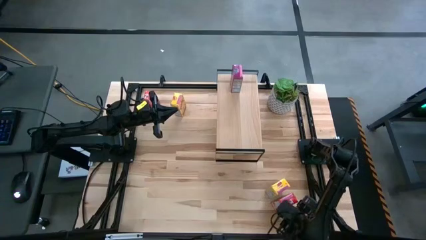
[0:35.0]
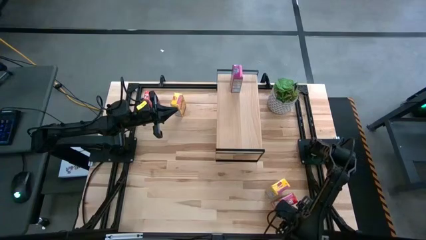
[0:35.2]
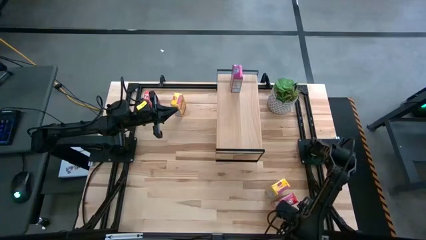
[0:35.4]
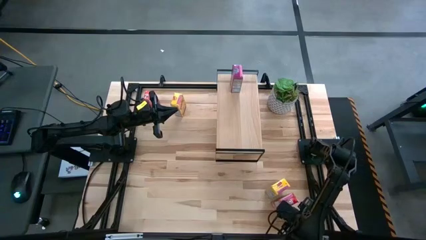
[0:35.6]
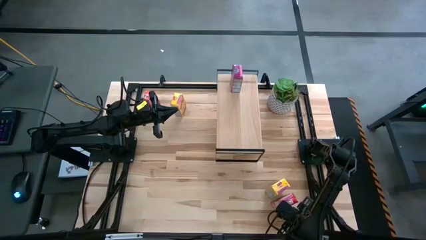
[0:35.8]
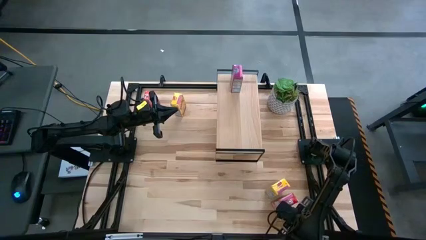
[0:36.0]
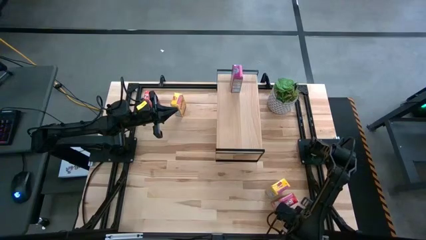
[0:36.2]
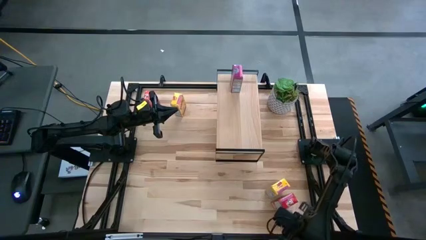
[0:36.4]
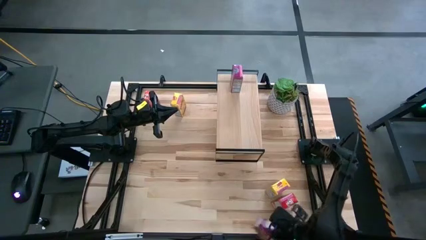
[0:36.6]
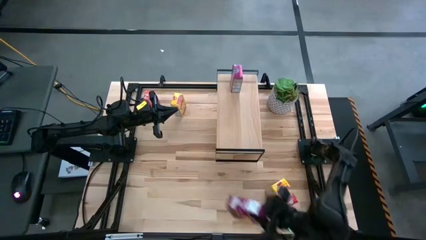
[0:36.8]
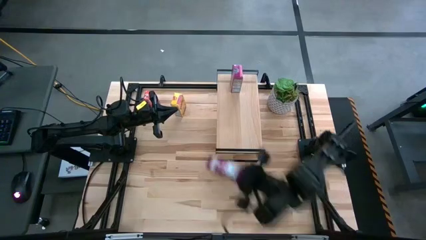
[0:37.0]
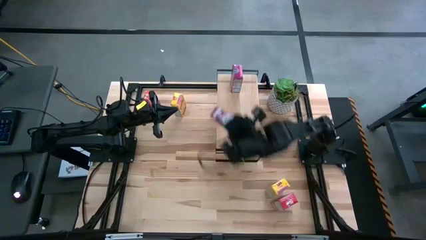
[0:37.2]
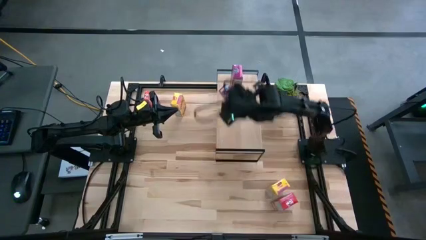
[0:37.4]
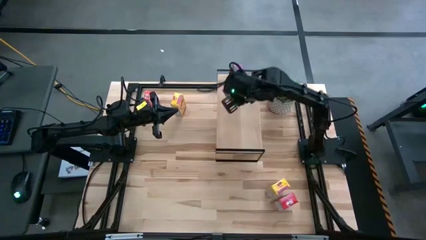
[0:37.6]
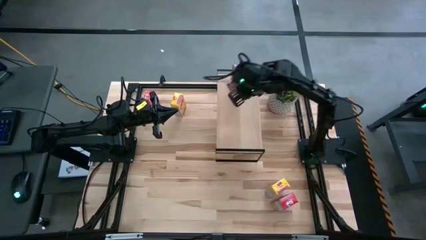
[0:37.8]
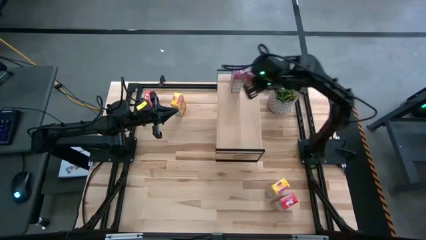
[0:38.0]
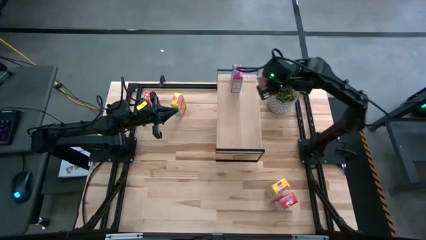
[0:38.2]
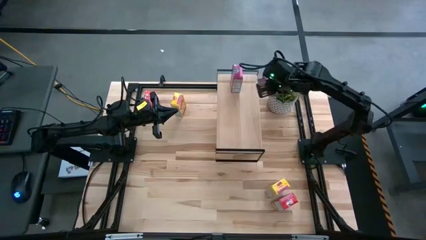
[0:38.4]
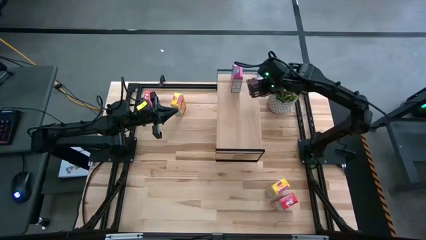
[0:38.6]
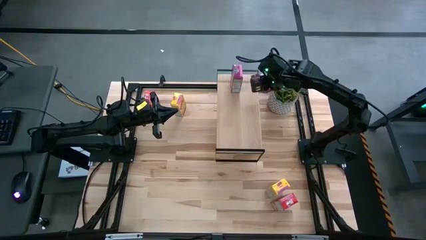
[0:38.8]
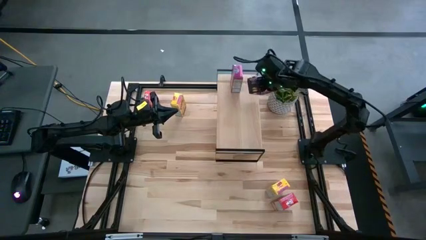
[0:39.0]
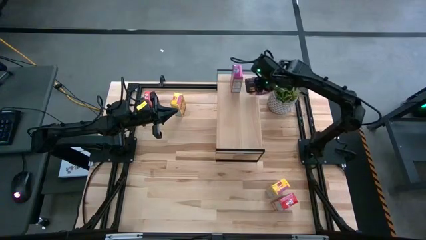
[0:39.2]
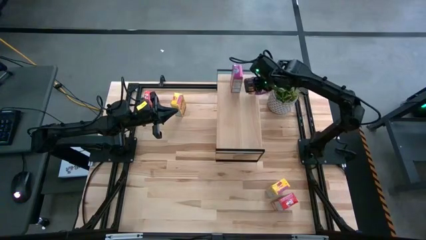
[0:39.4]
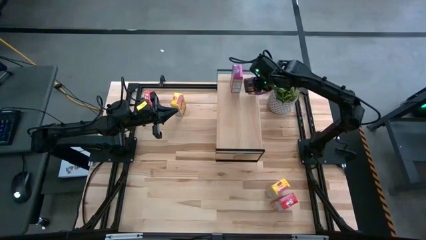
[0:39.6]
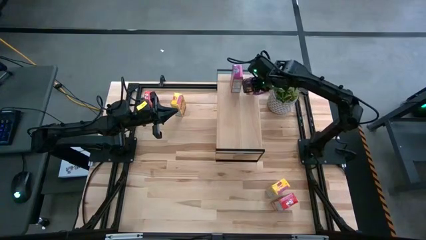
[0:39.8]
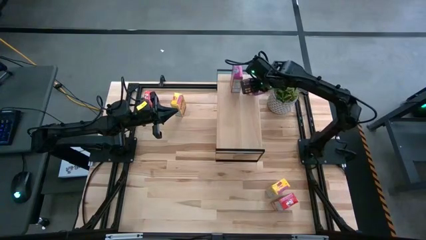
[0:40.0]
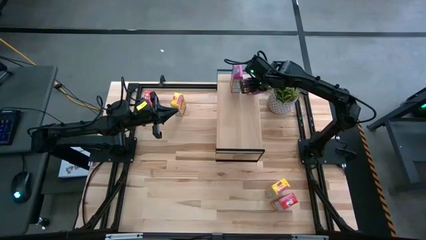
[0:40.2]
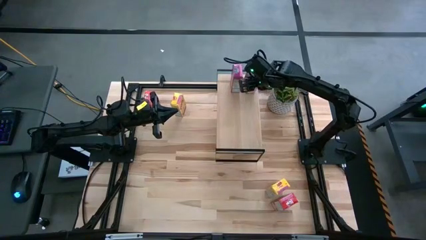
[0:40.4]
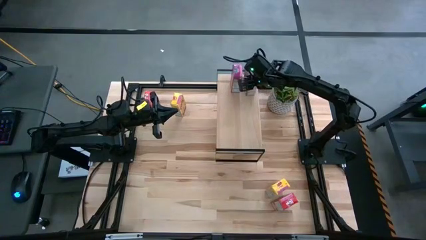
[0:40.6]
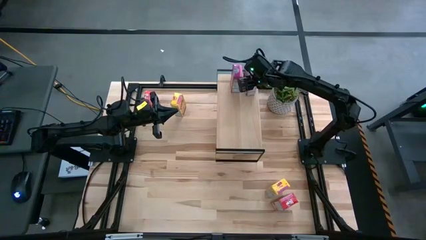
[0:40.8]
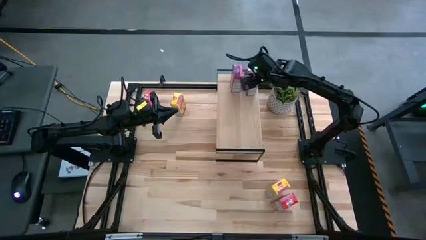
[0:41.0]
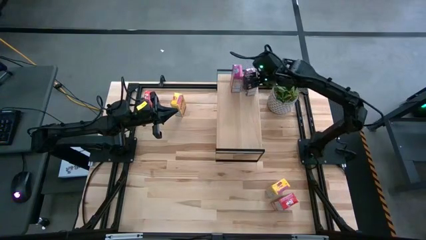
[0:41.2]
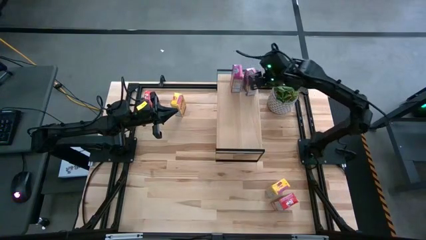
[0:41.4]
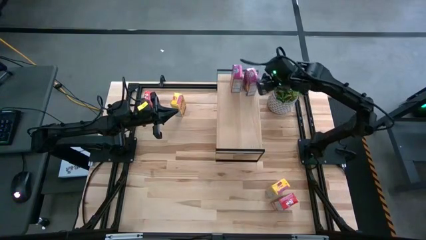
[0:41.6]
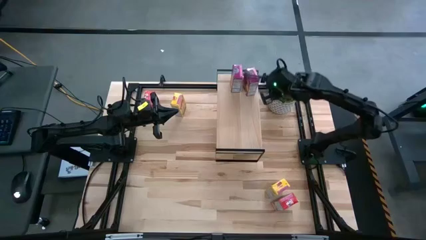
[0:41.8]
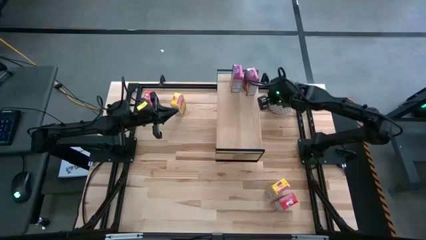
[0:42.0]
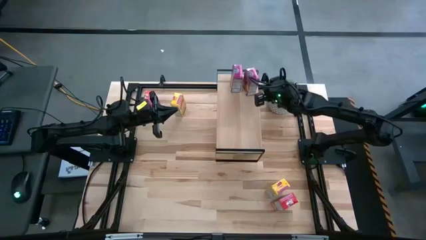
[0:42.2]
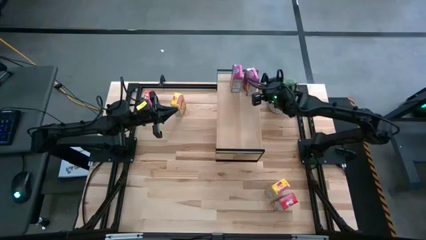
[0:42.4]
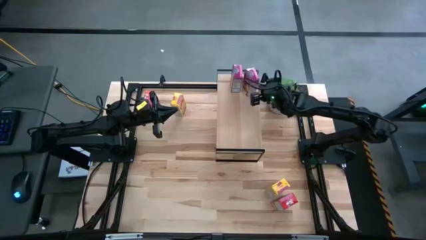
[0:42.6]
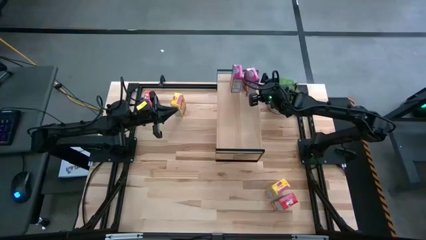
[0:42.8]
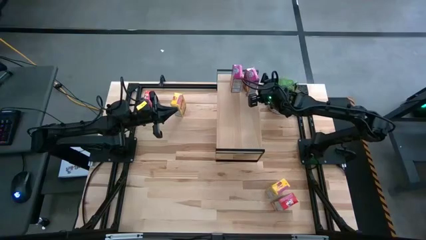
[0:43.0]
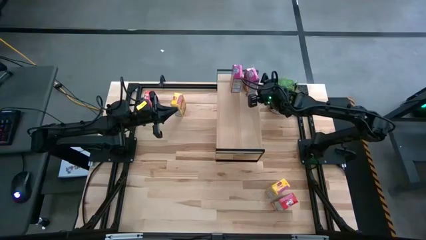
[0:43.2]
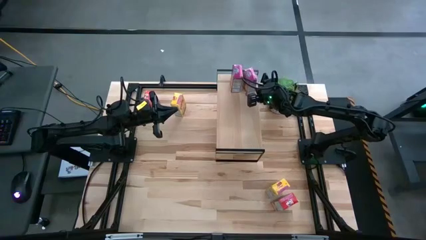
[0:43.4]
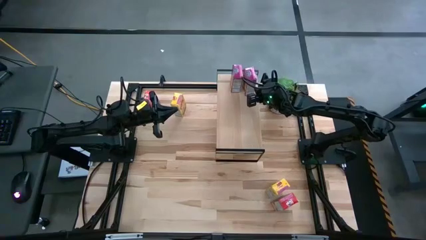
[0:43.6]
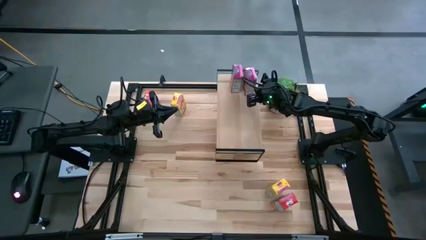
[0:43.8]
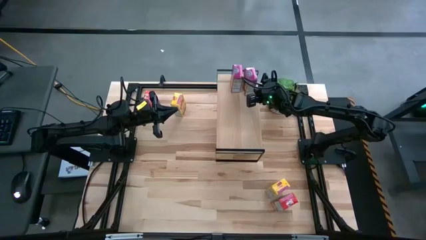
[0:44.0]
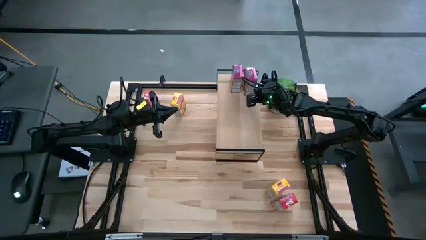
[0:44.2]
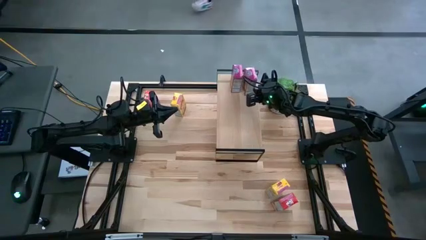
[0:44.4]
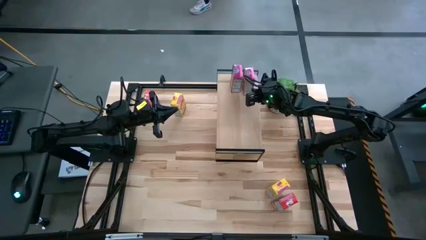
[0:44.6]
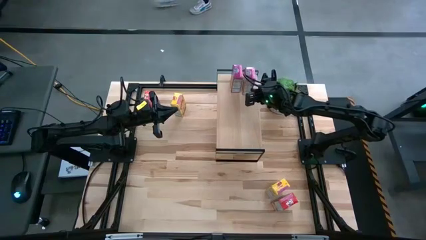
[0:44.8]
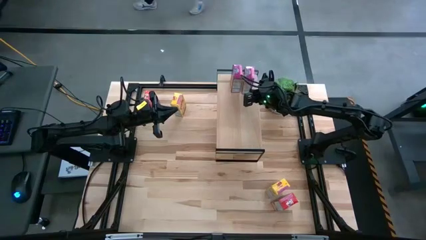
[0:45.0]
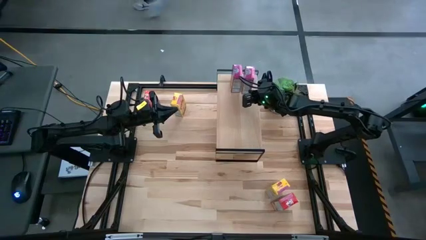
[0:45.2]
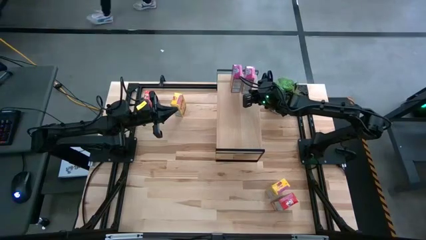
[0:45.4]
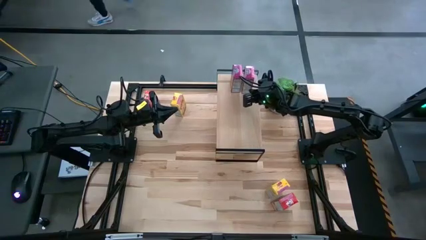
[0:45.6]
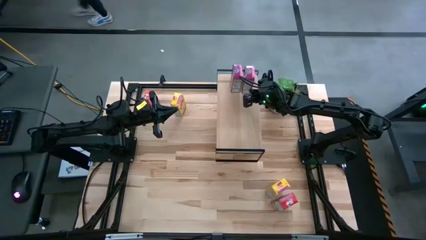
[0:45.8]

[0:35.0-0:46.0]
Task: Stack cereal on shelf
Put the purple cereal box on the shelf aligned with the purple cereal box
